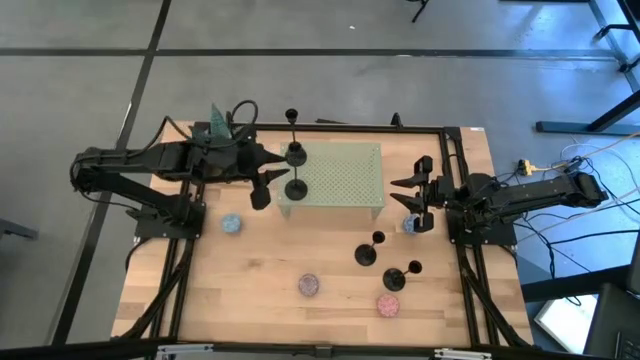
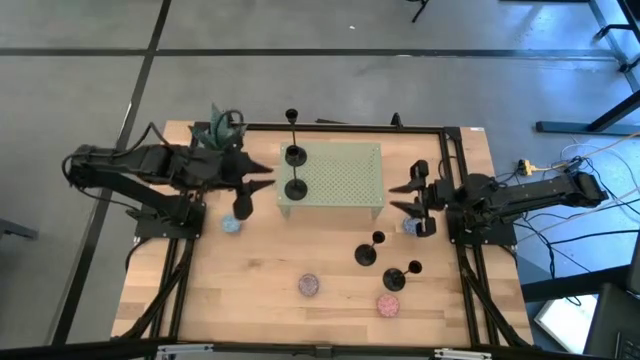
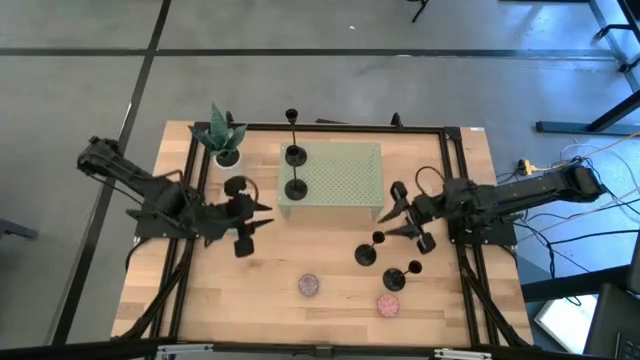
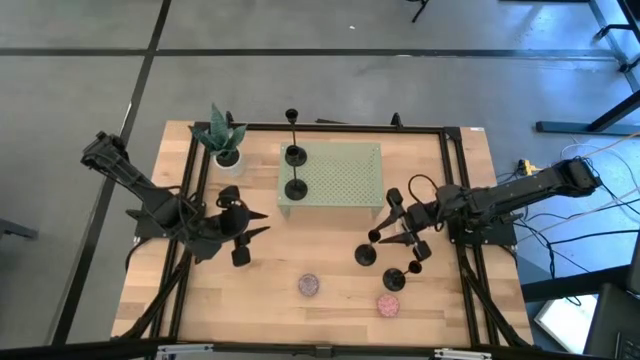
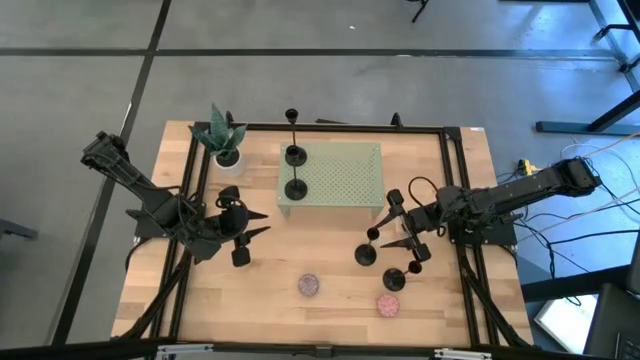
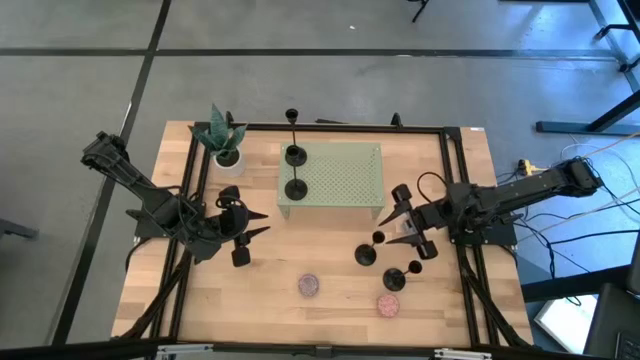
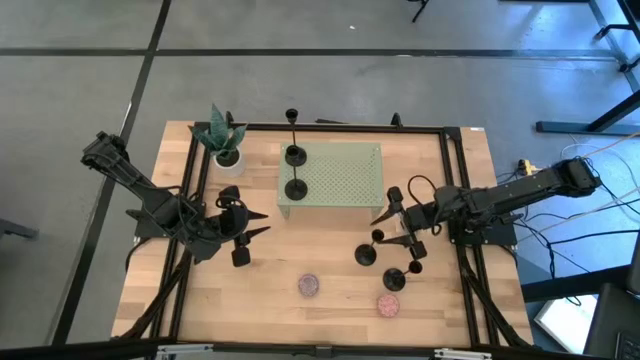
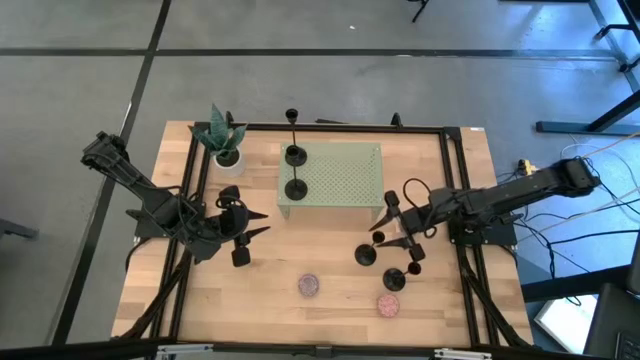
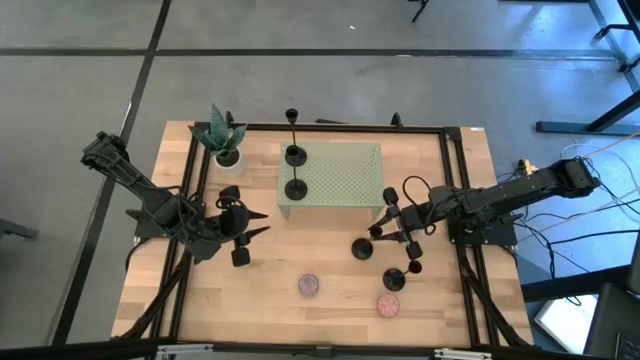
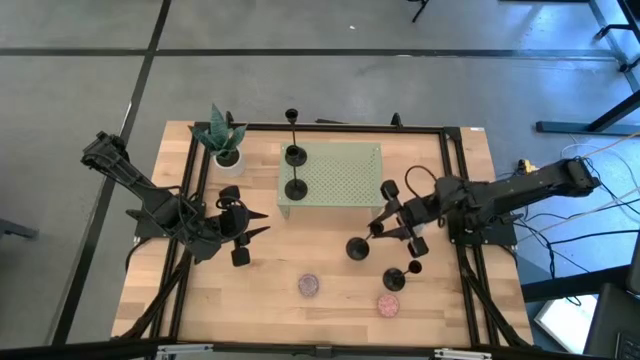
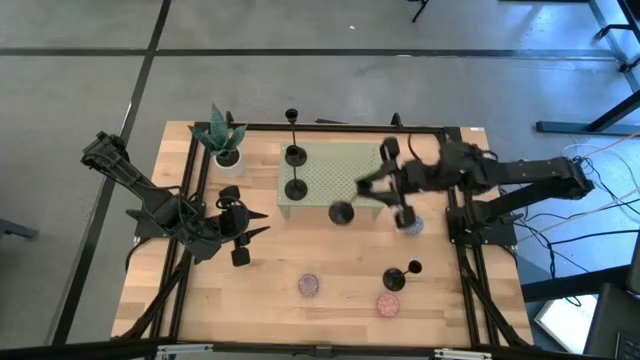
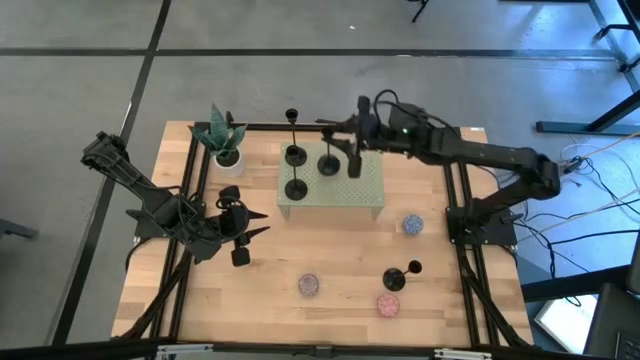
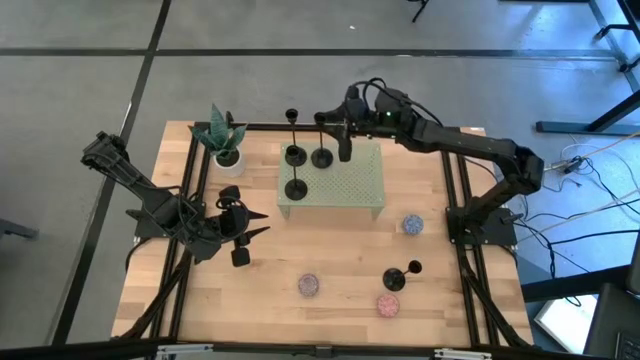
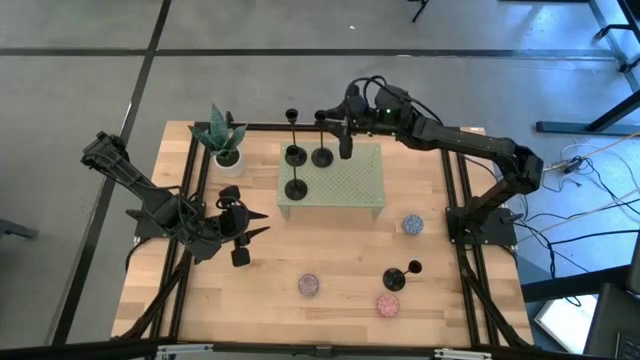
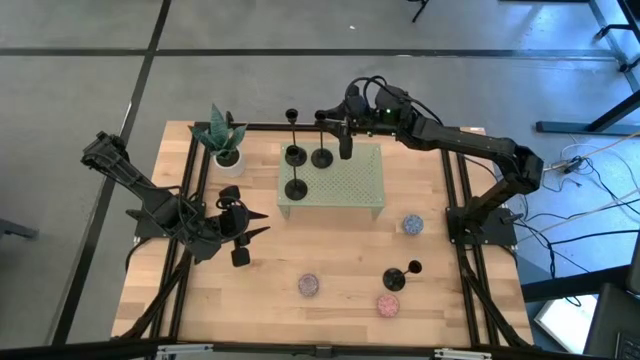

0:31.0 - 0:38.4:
Task: Pick & Place candle stick holders
Put the black candle holder on the shelf

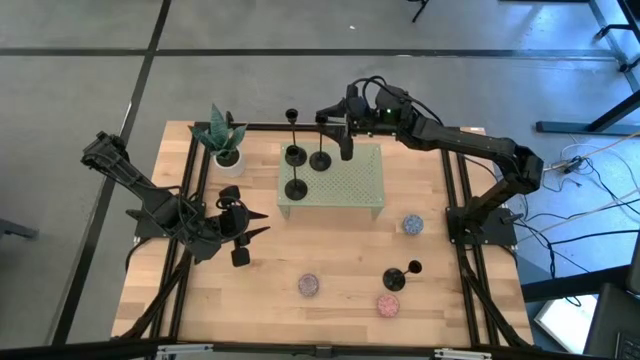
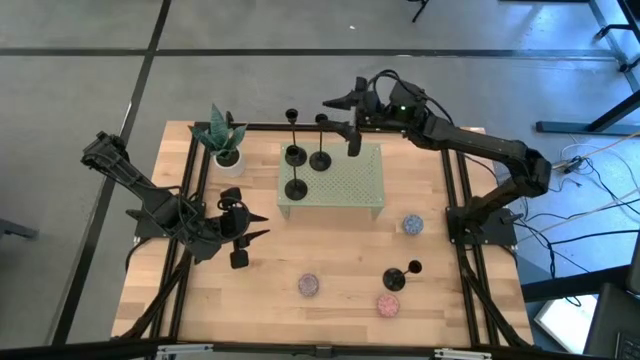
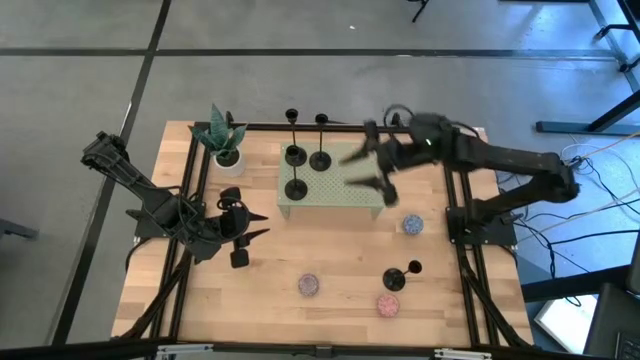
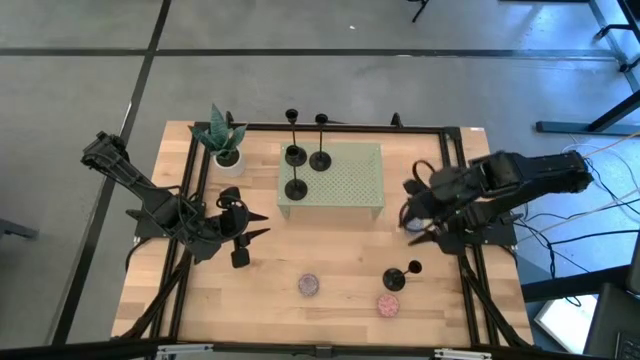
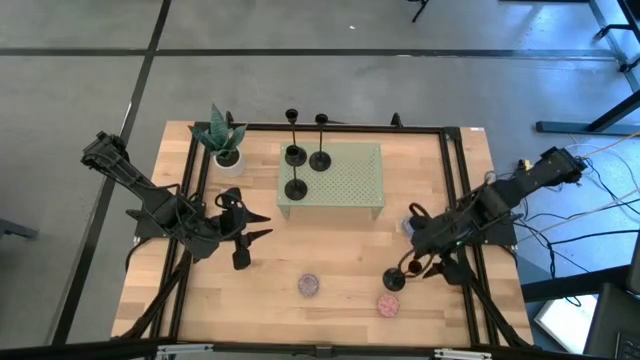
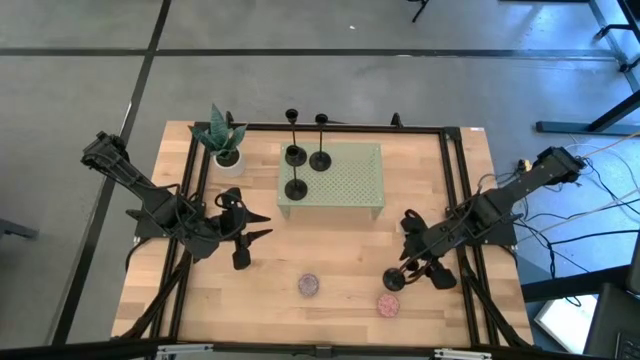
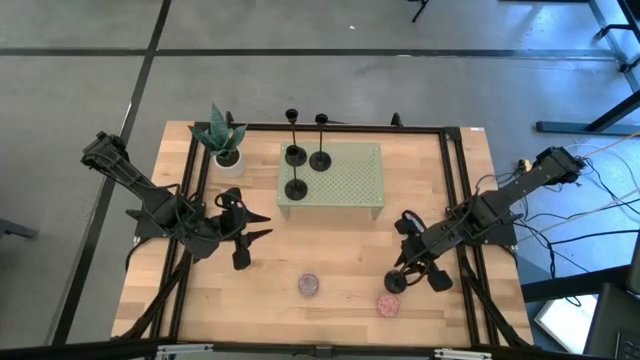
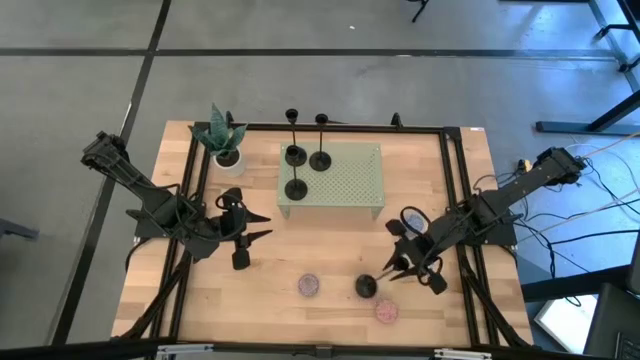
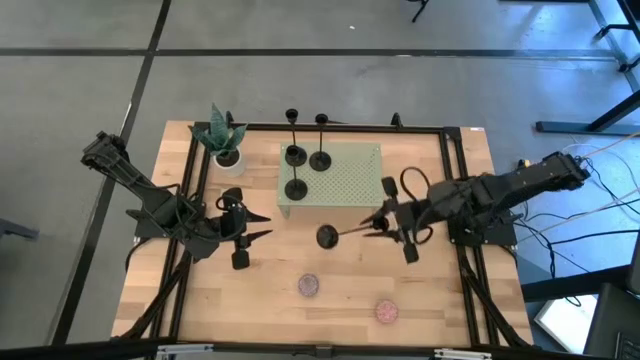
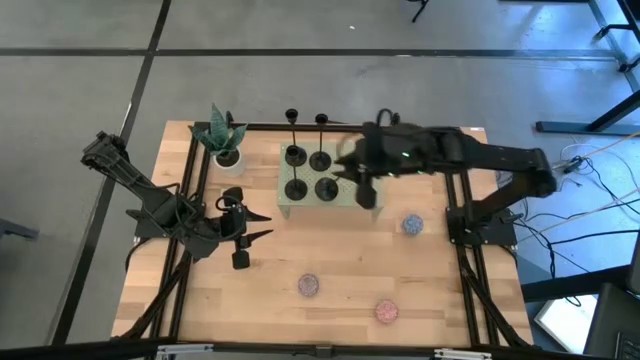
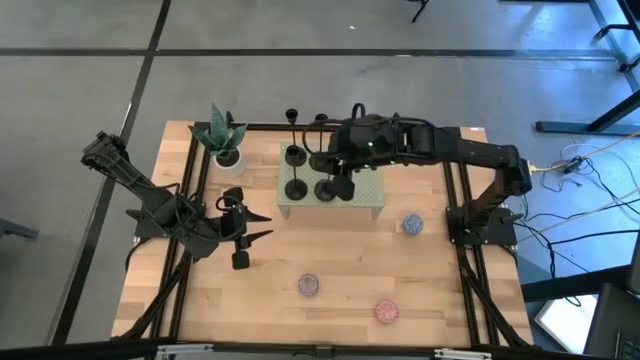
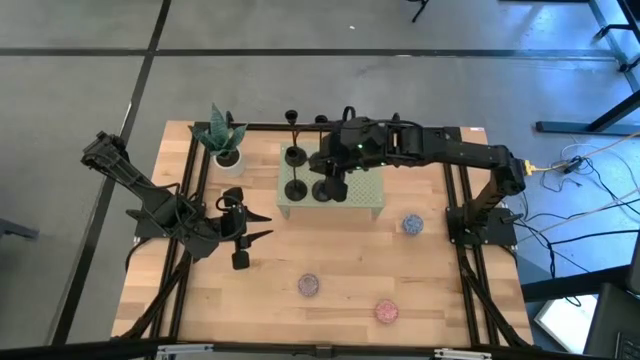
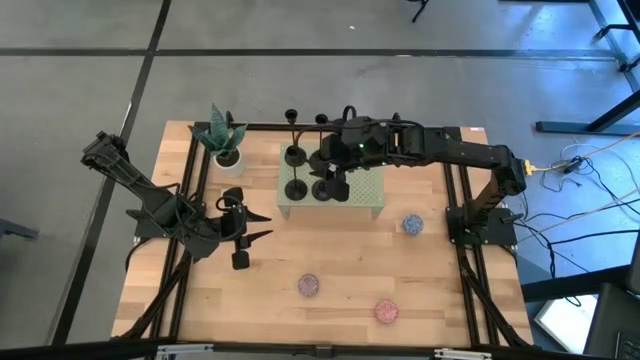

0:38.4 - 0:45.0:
Align the black candle holder with the black candle holder on the shelf

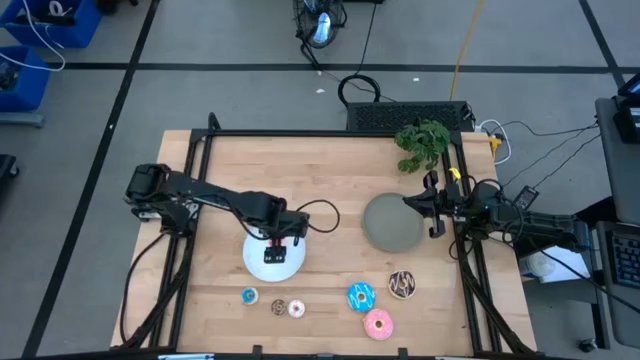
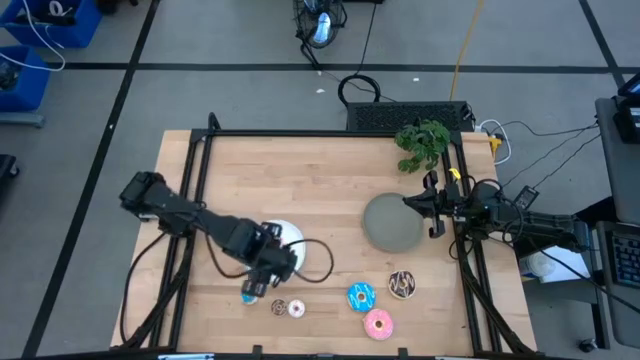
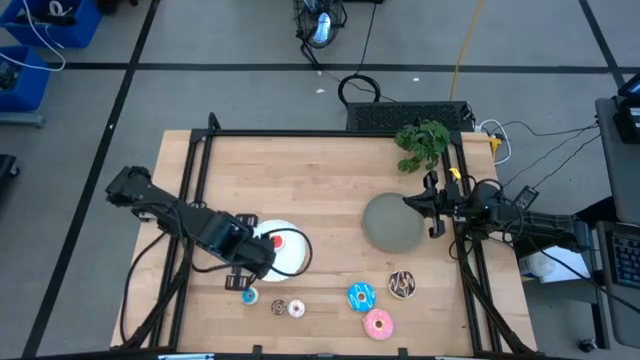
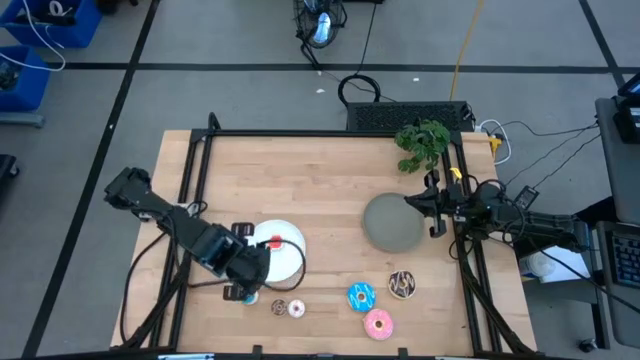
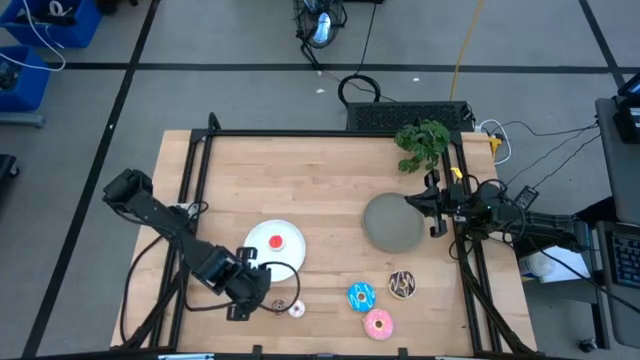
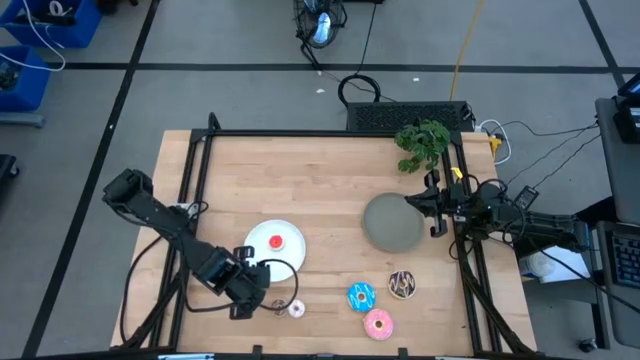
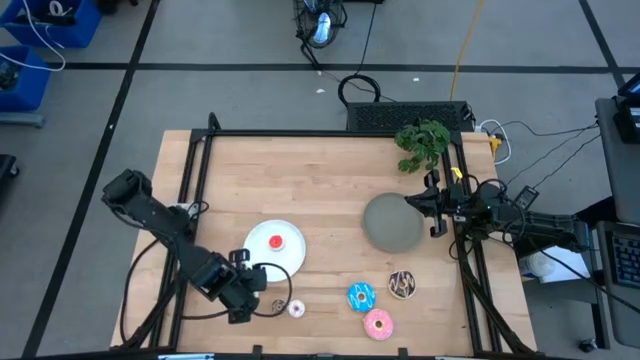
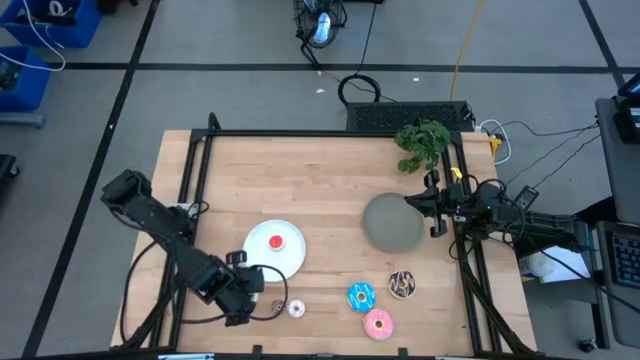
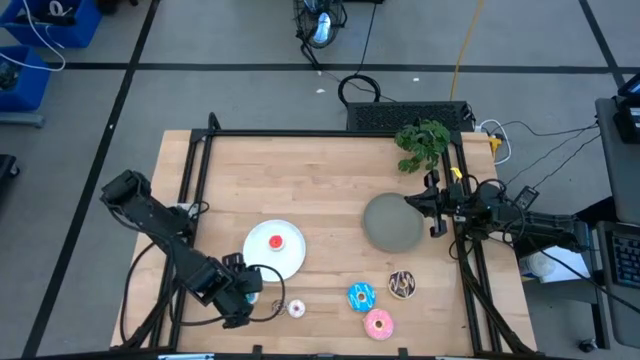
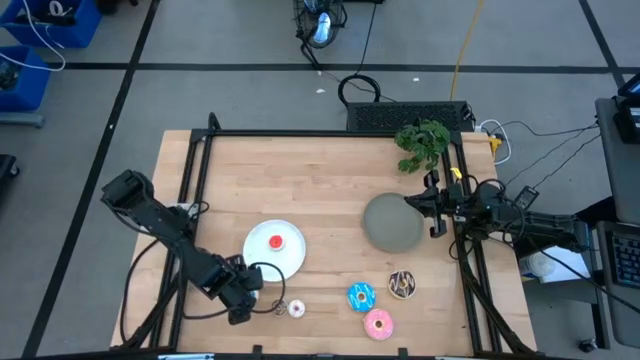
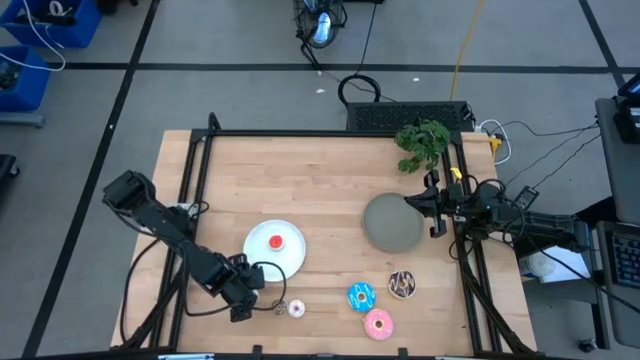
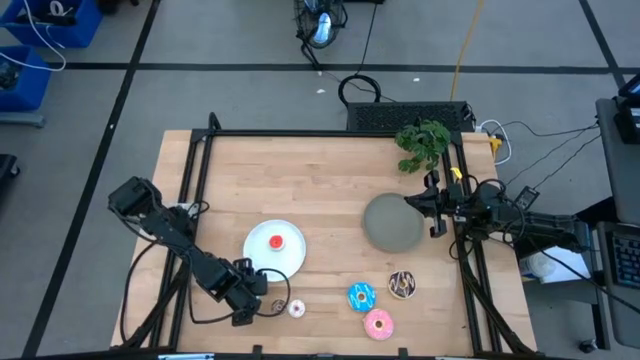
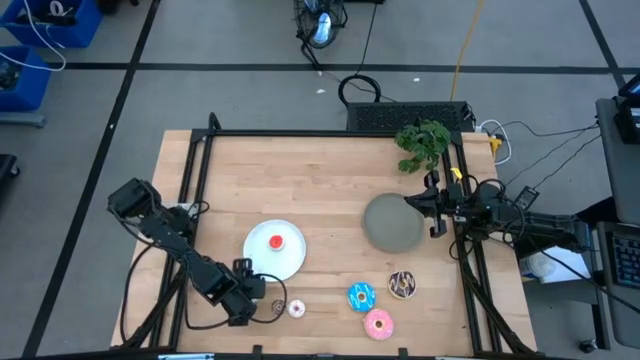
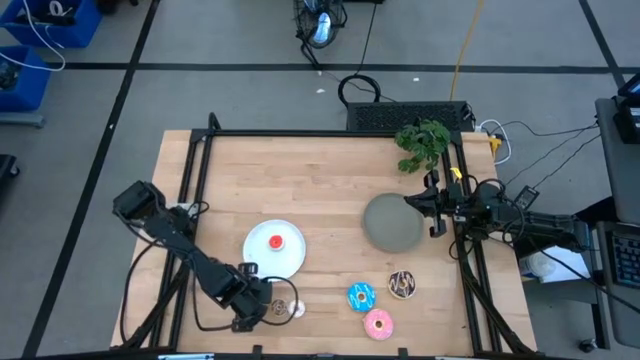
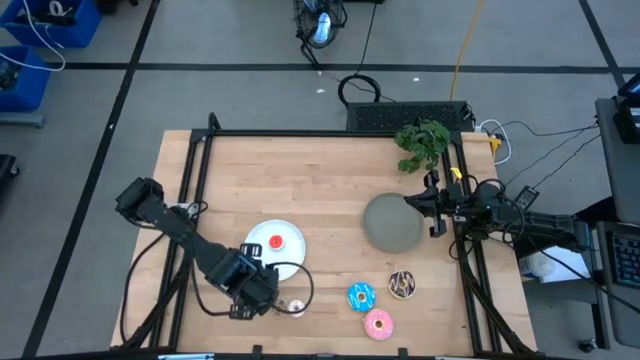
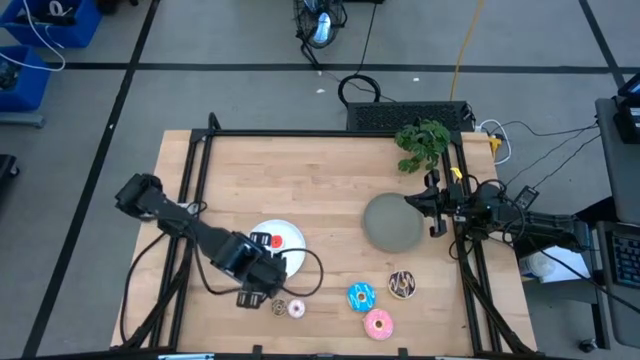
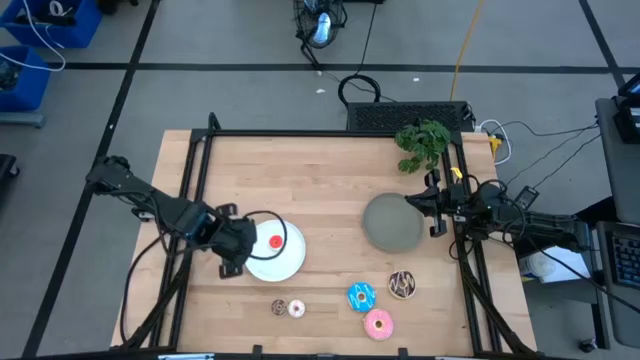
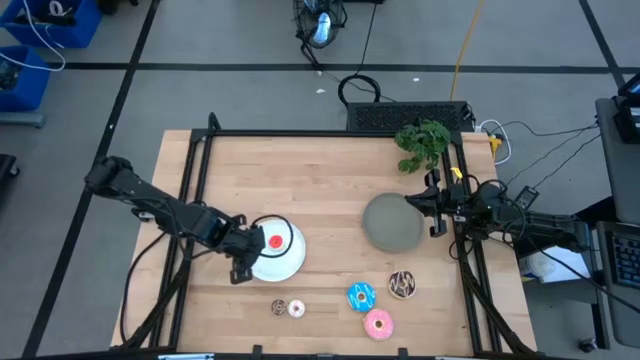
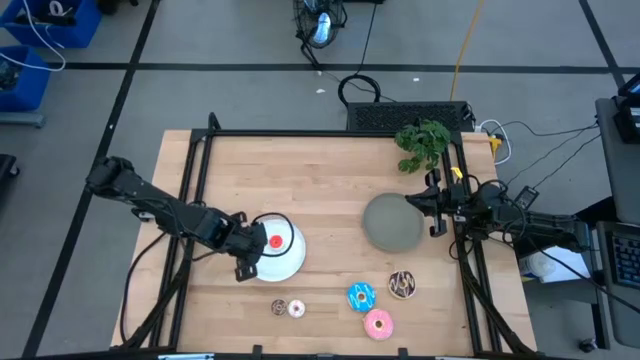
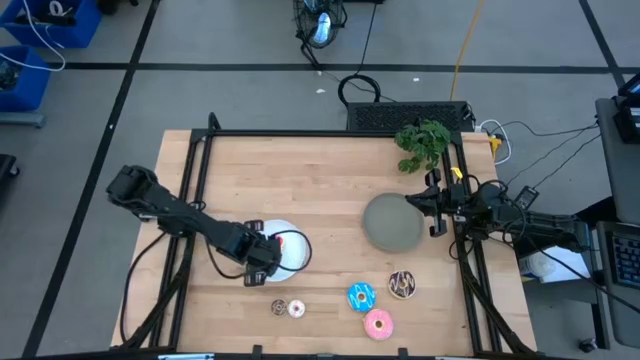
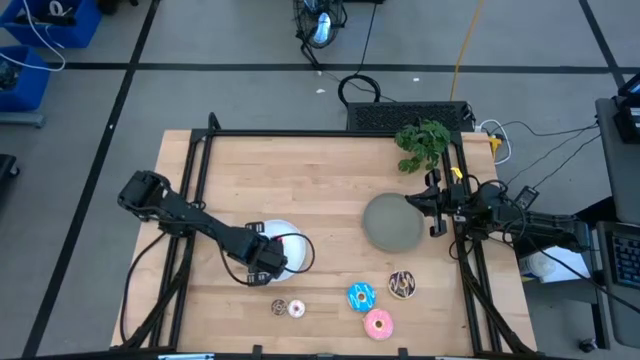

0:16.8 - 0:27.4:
Task: Pick & Place donuts
Put the small blue donut on the white plate
